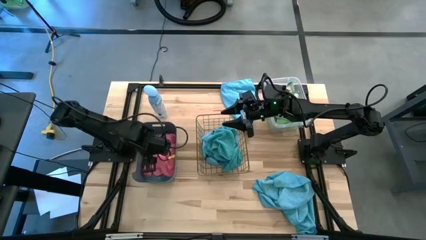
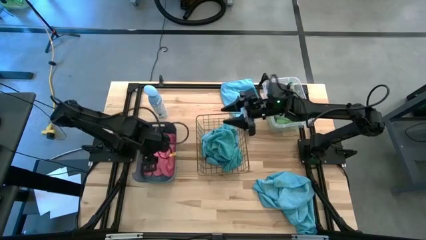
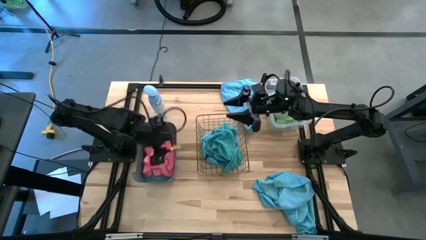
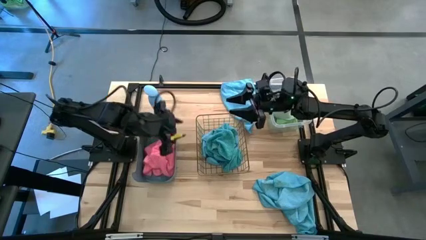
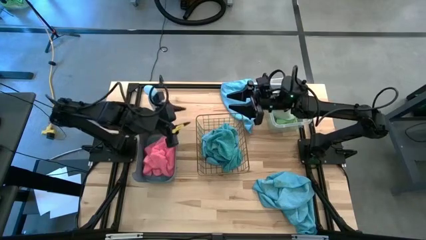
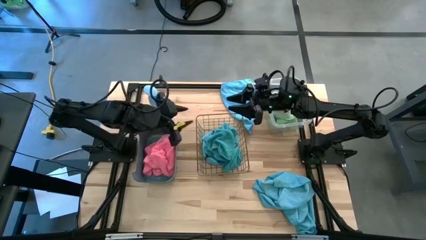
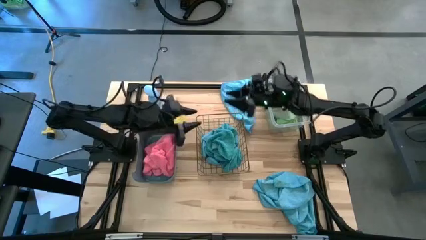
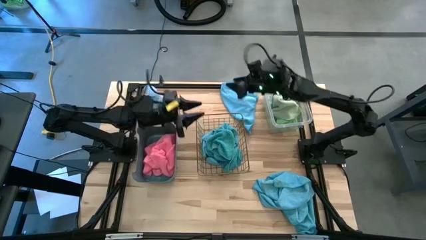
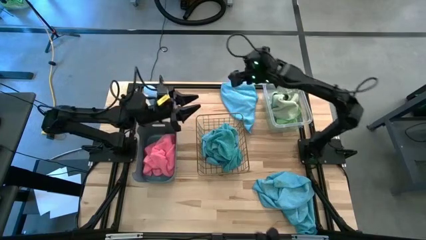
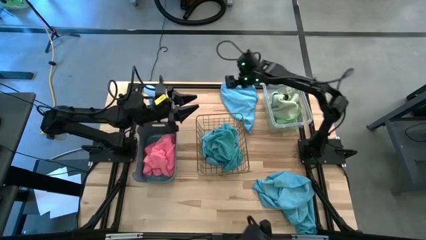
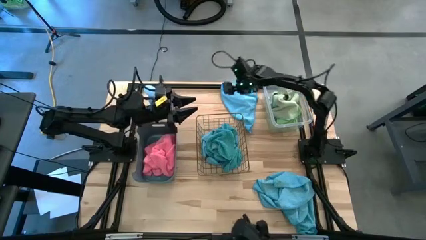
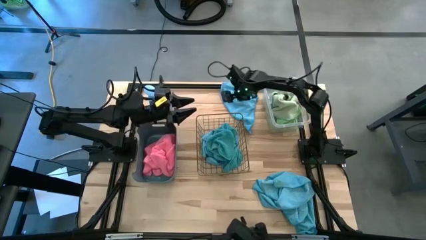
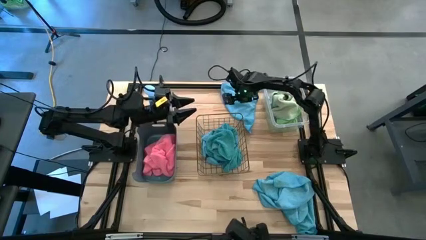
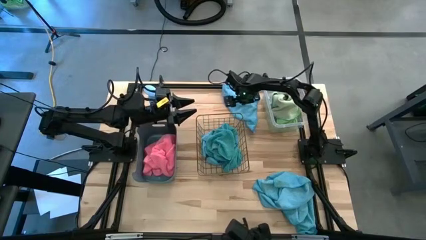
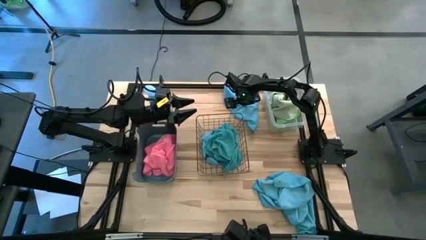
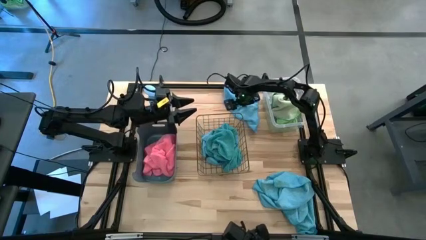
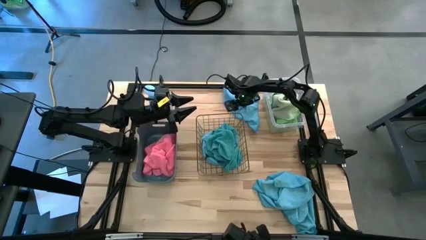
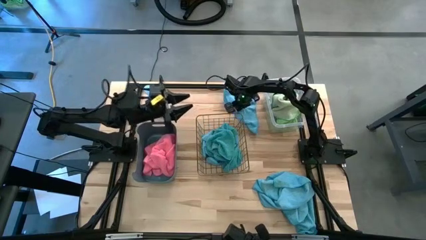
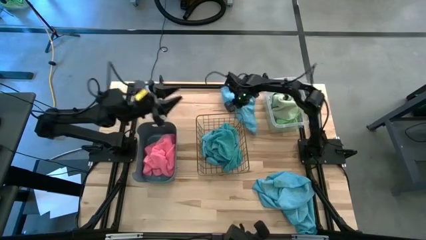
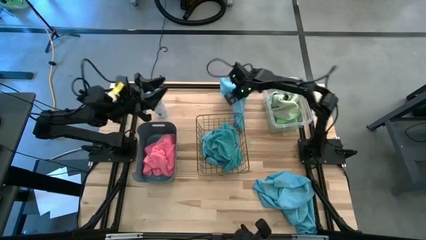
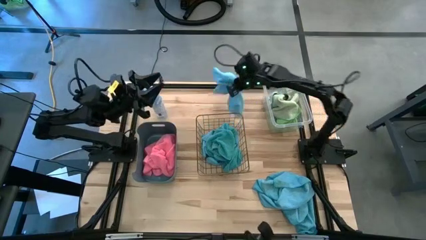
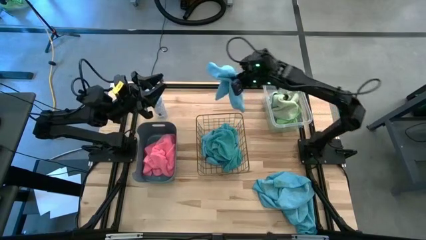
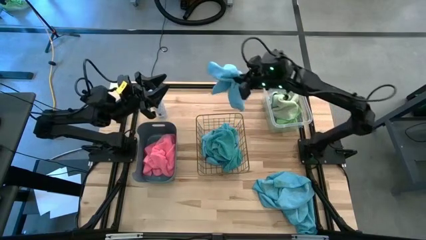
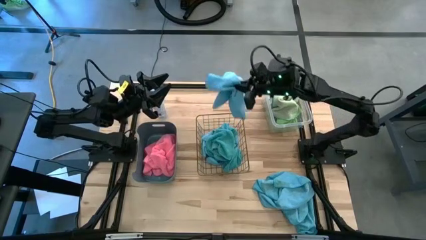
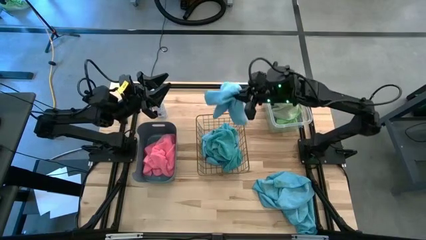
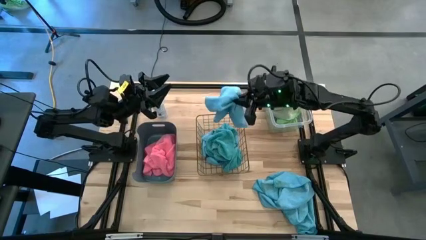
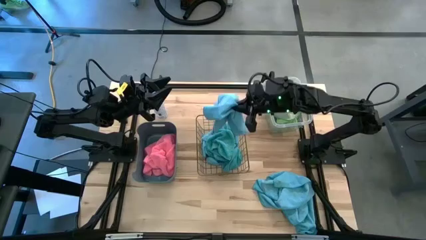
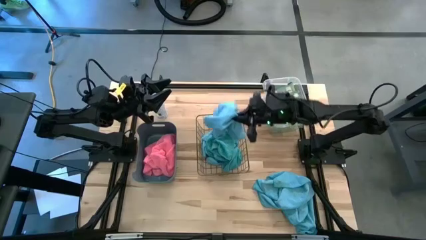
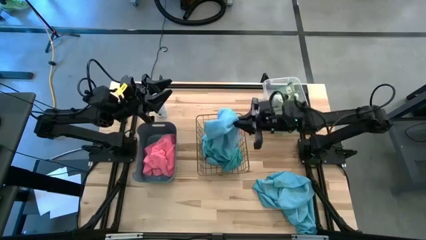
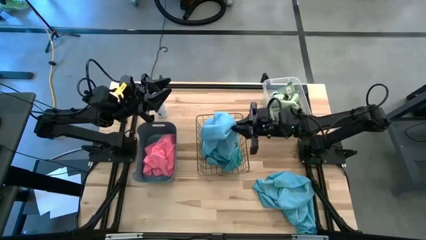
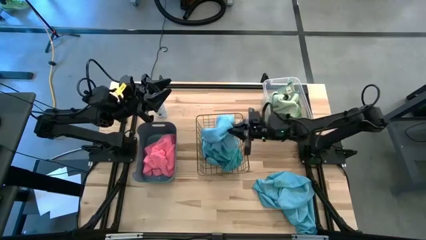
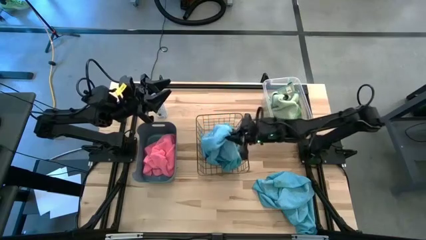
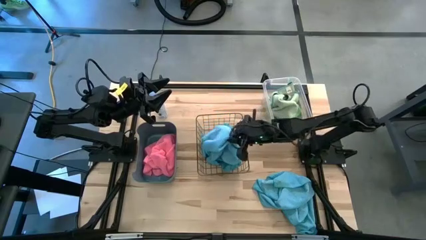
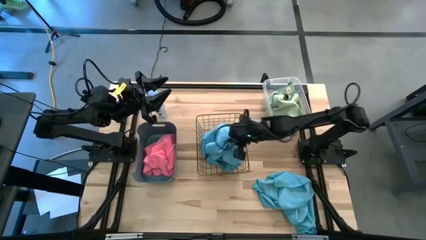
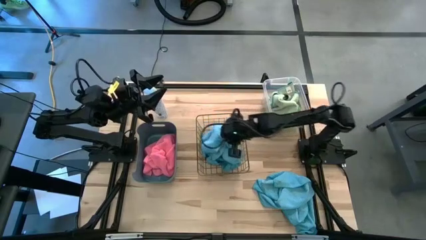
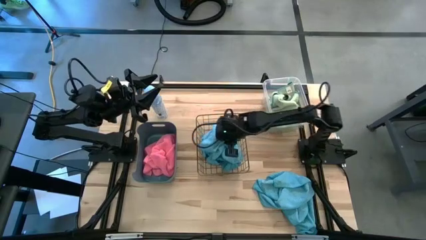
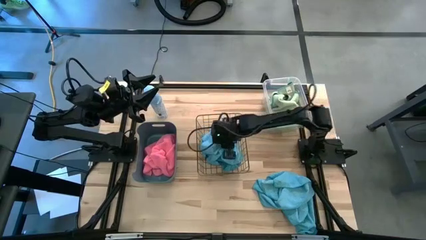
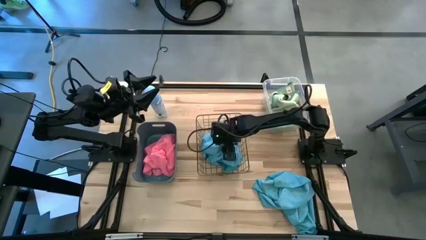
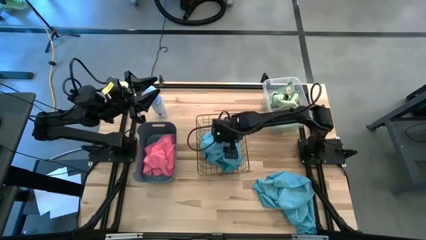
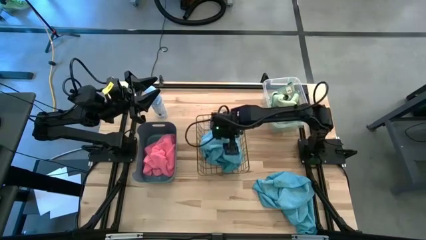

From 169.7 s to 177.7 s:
Task: Sort microfiber towel by color & place in baskets
Put the blue towel into the wire basket

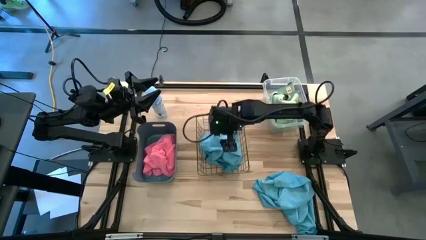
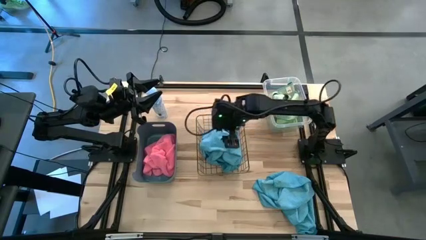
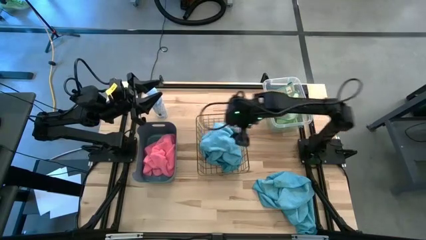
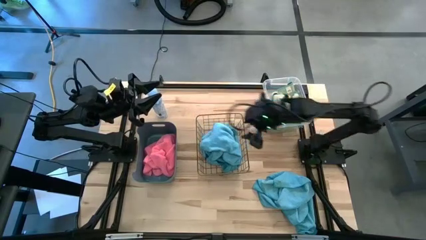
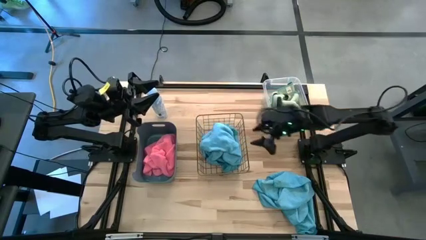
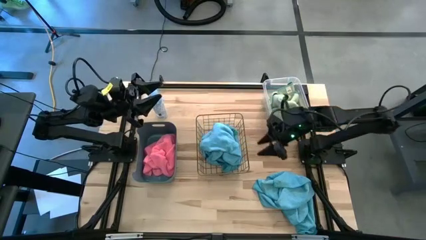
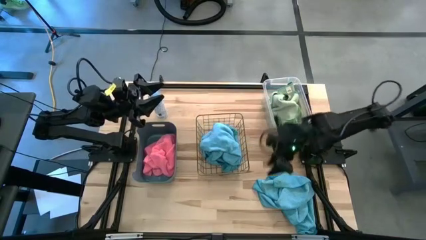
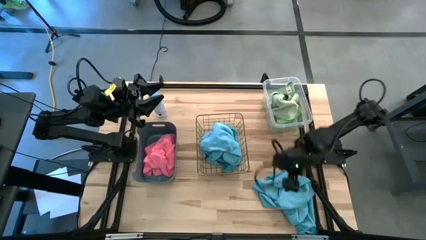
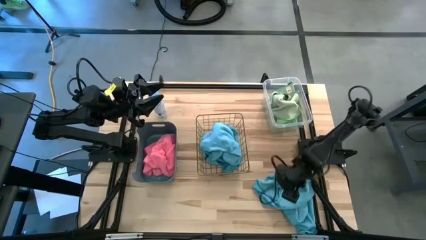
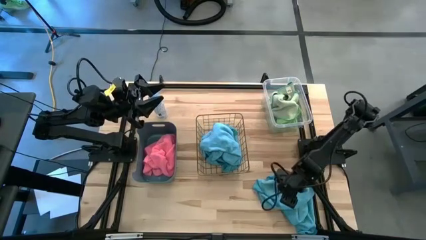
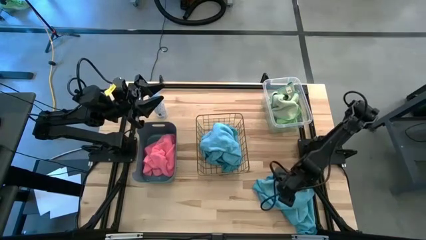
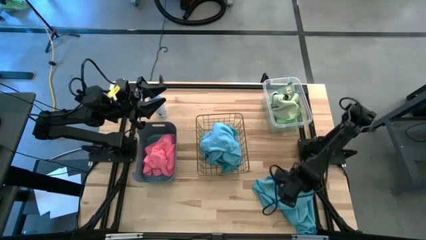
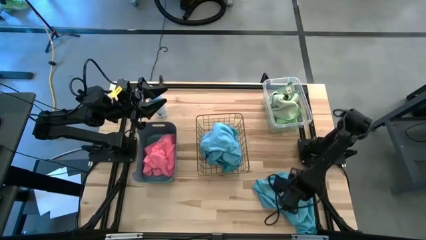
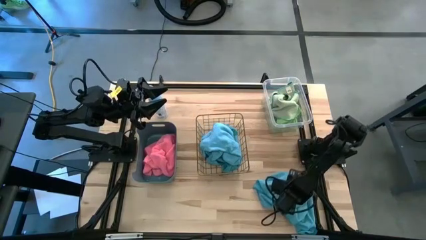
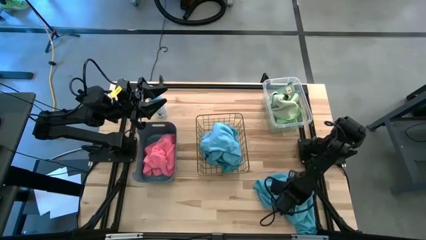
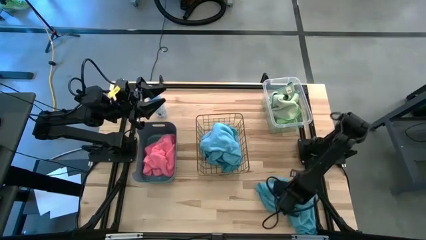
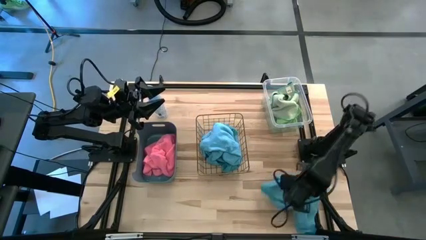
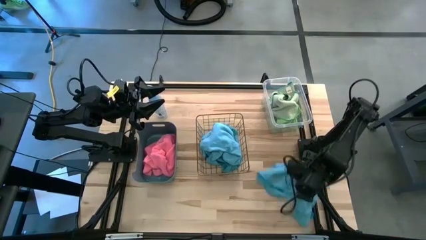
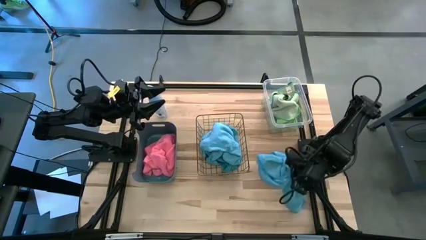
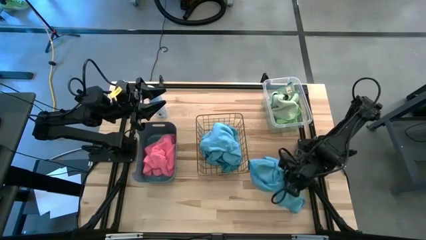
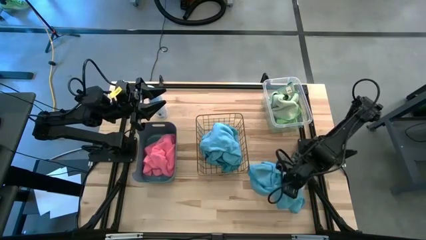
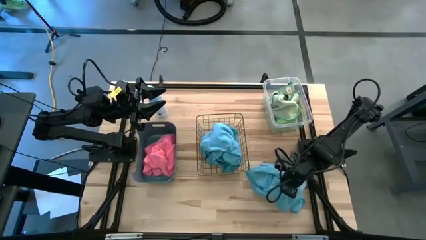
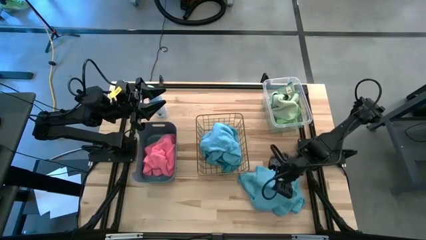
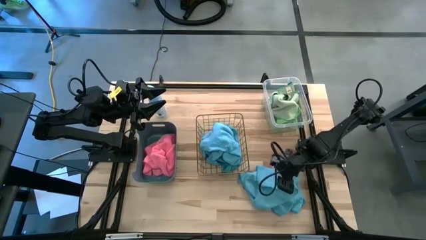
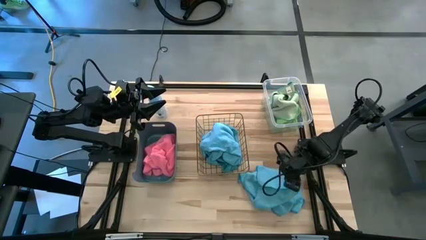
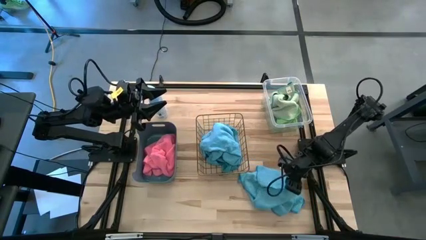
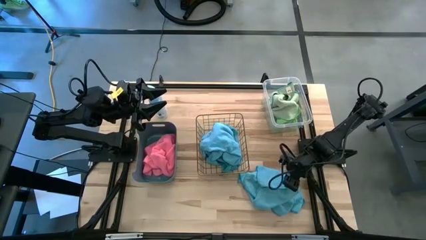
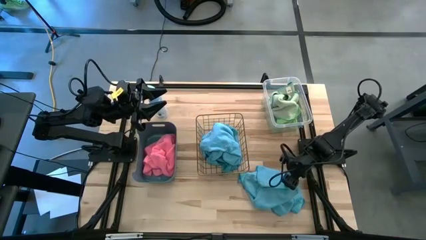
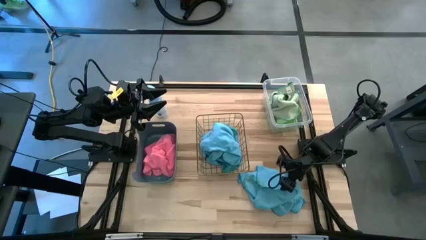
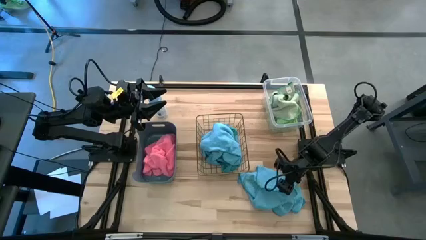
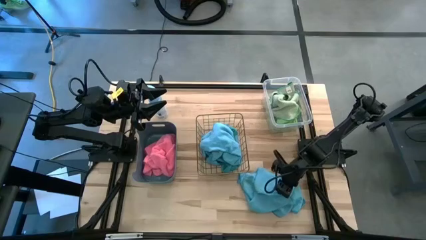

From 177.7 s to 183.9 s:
Put the blue towel into the wire basket
